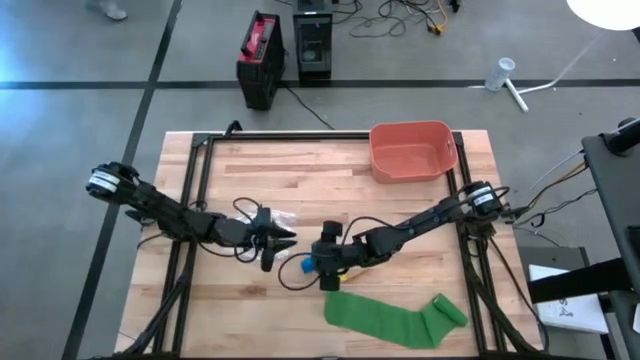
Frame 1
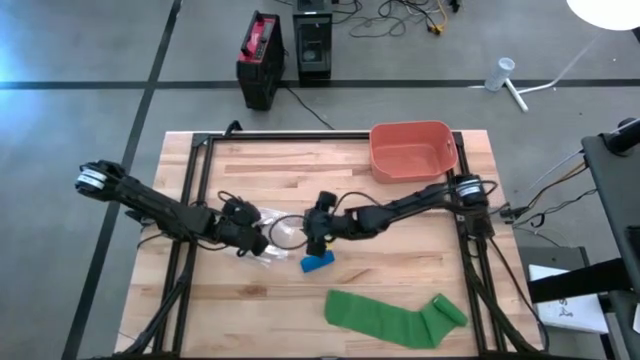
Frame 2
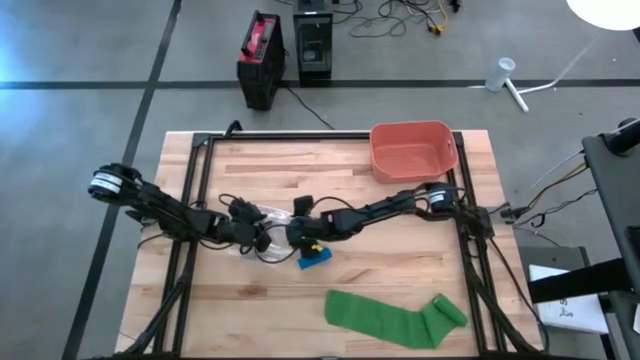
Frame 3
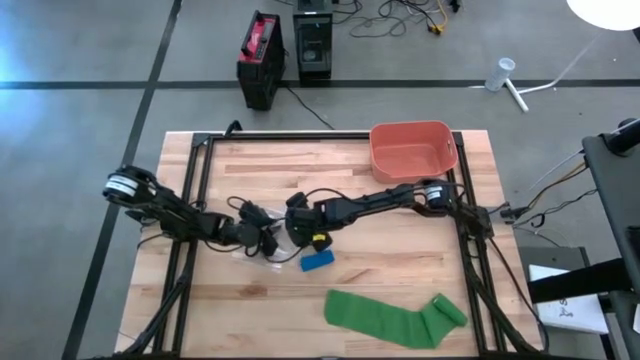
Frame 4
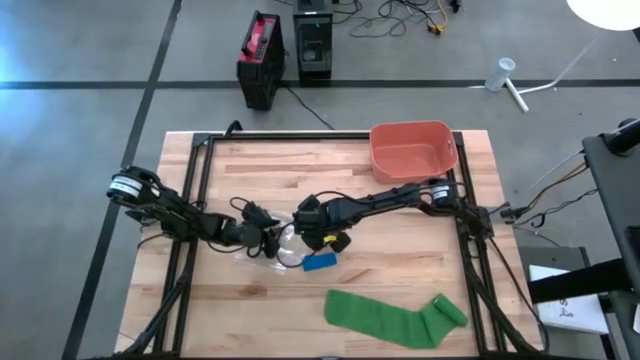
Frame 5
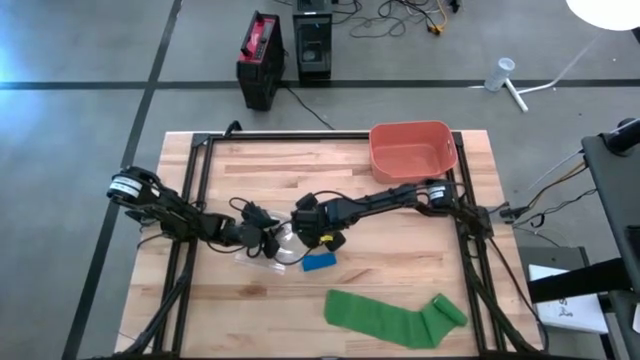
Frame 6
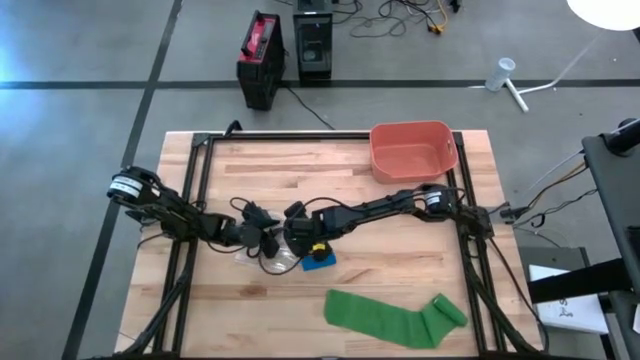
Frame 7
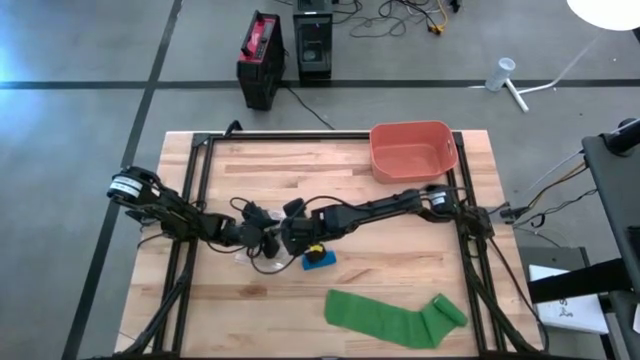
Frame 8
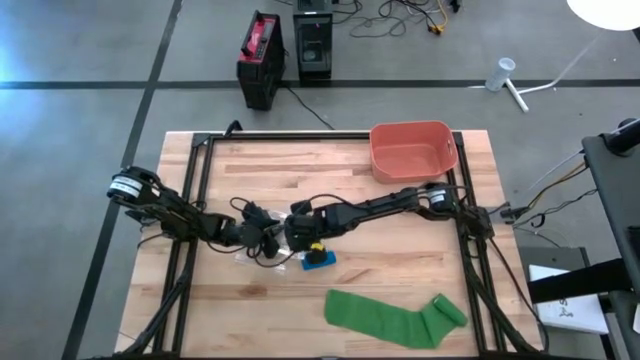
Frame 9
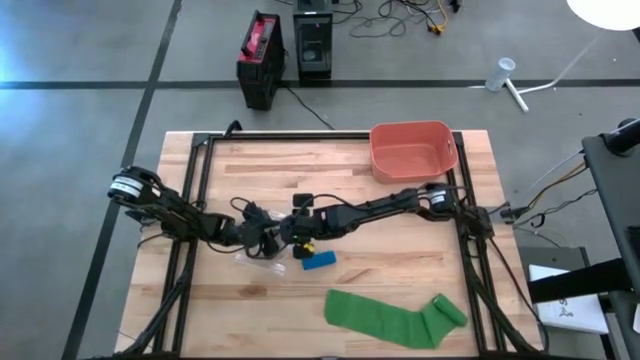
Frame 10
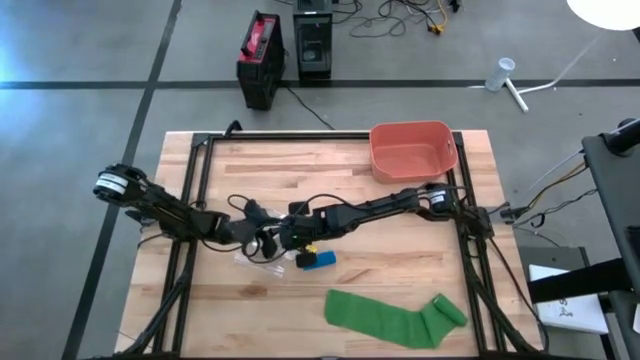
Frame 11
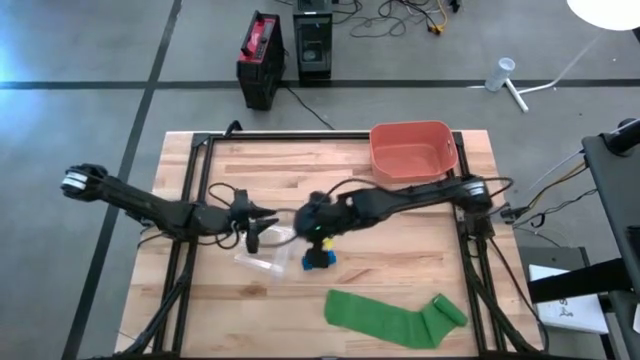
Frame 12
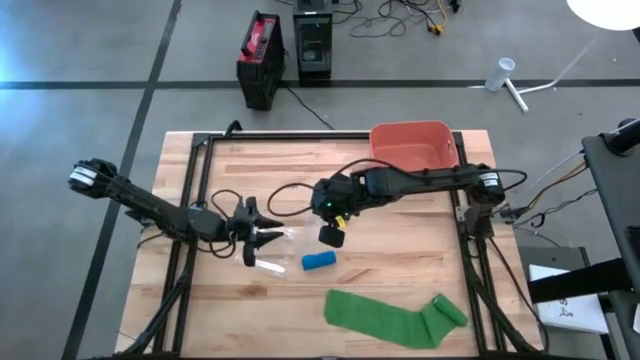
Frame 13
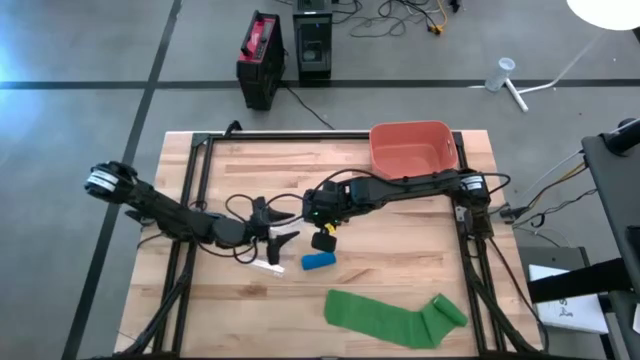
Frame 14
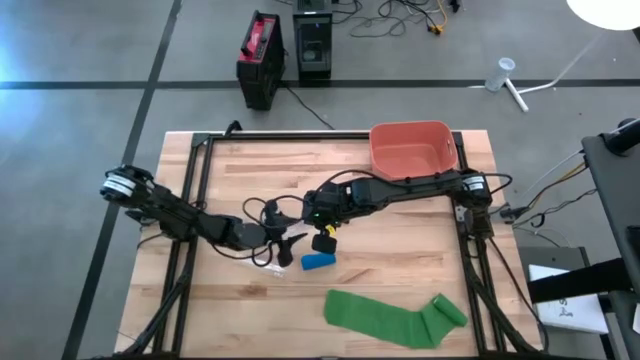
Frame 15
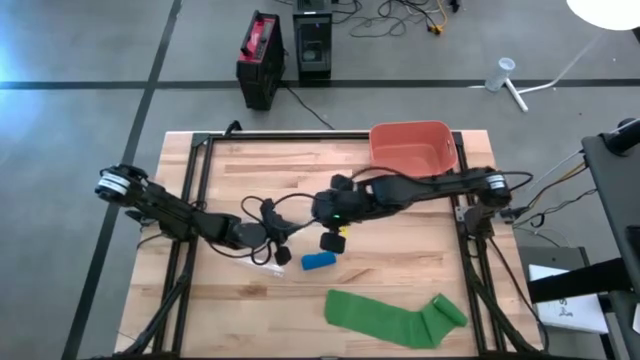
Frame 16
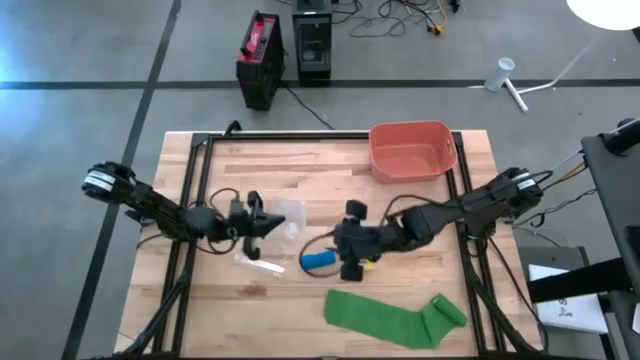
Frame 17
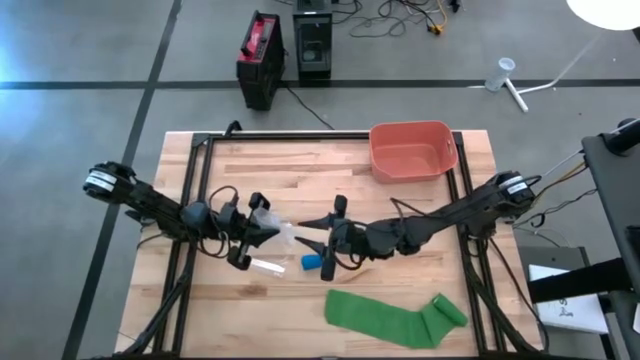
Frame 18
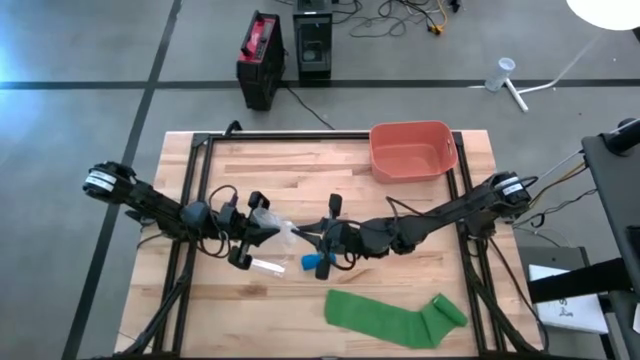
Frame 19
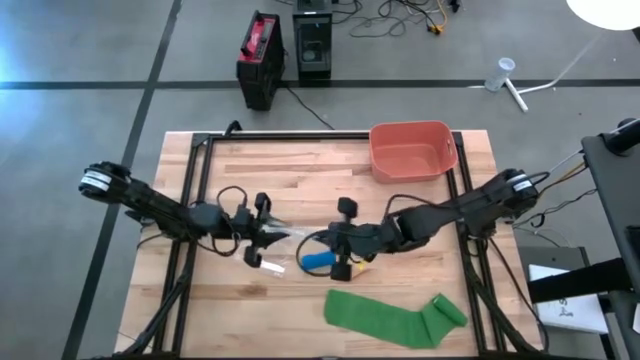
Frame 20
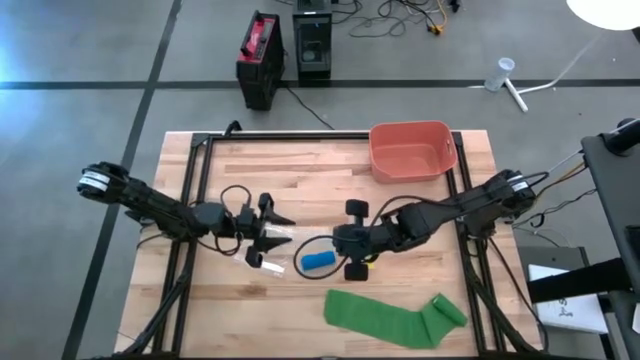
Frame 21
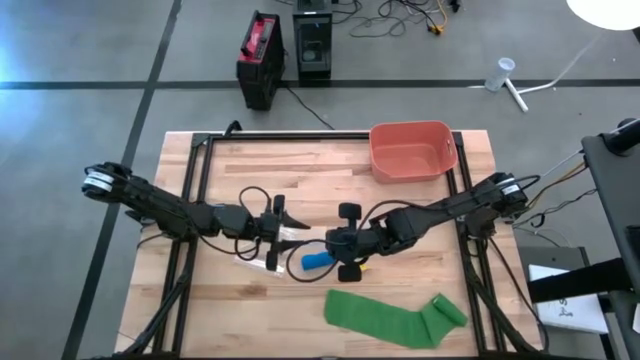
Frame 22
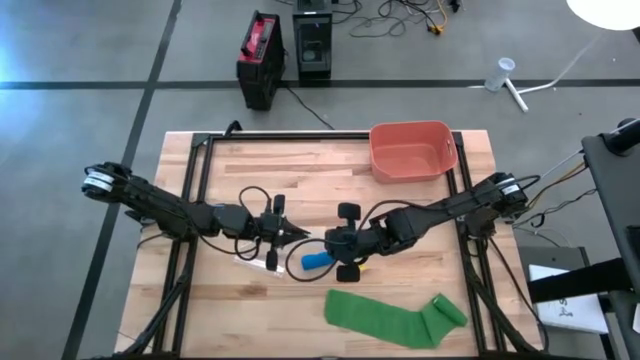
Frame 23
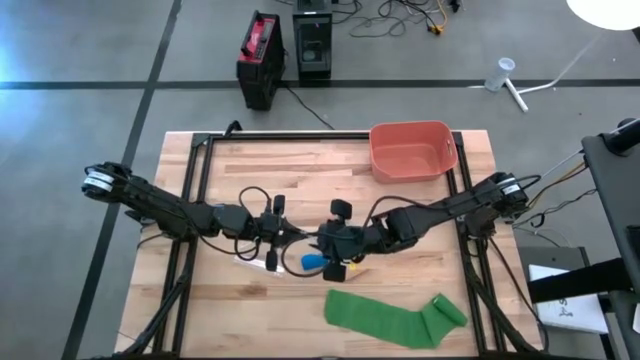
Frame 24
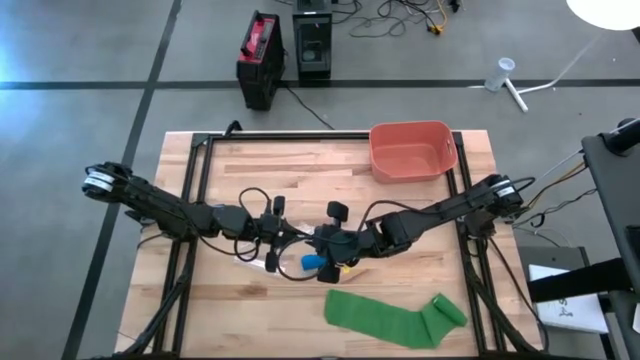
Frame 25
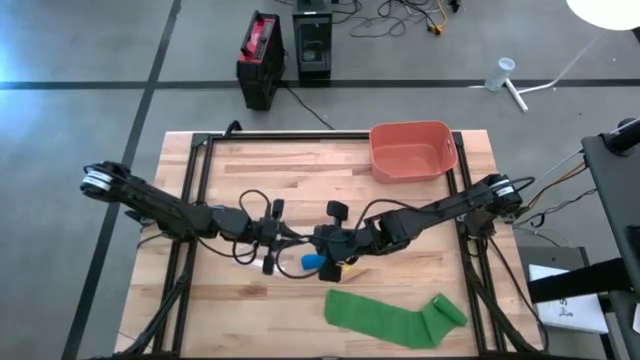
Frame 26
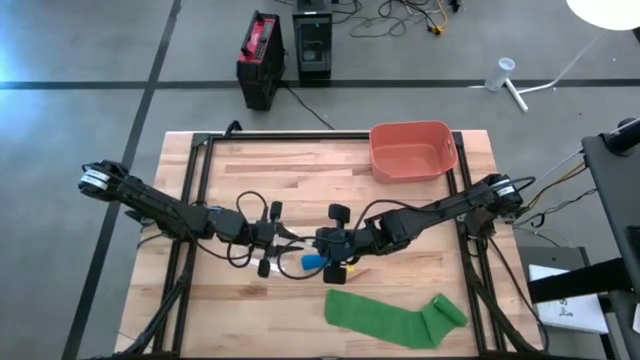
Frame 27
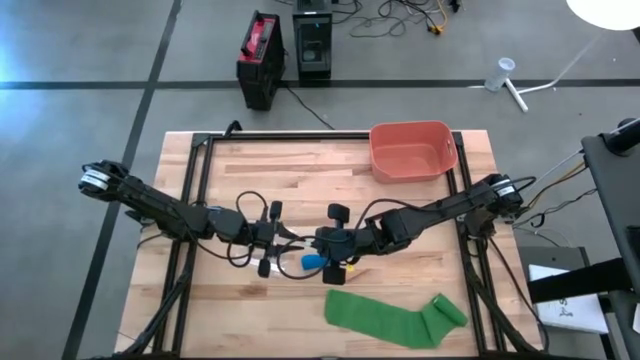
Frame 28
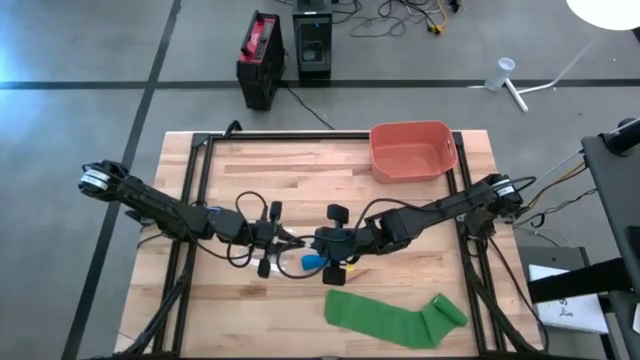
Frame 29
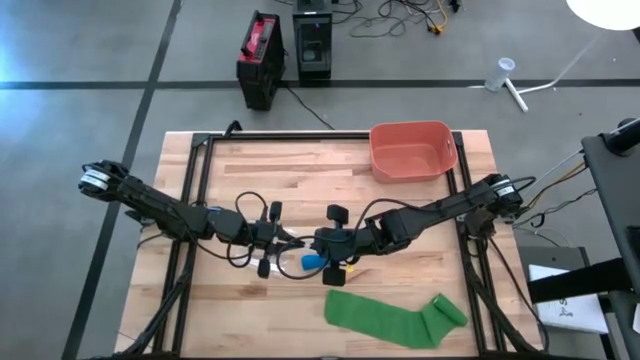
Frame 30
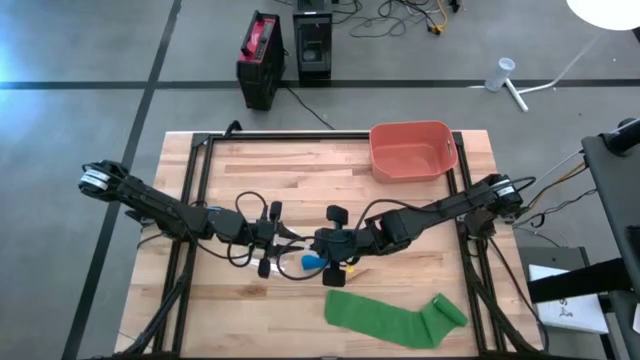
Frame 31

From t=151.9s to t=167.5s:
Task: Roll bandage
Open the transparent zip bag

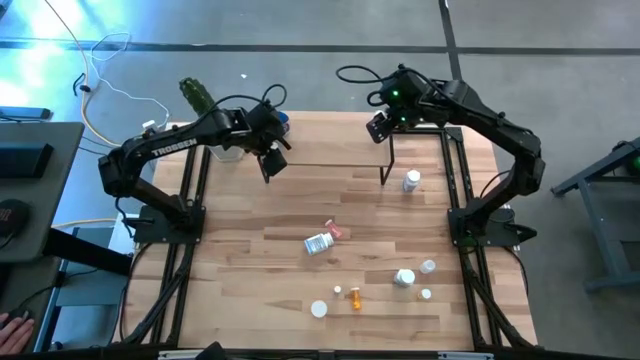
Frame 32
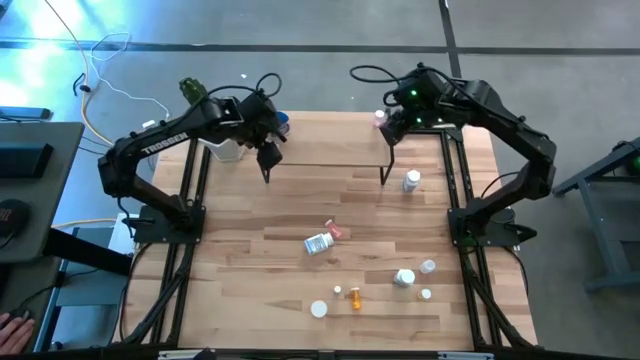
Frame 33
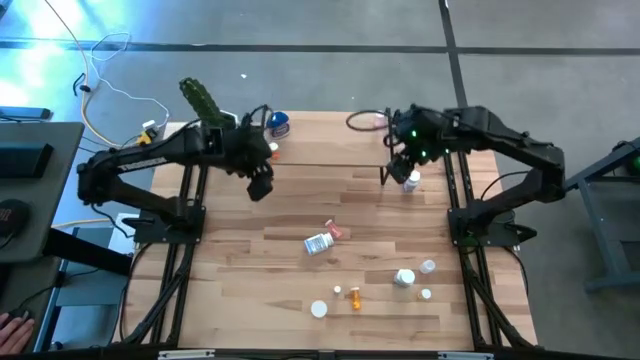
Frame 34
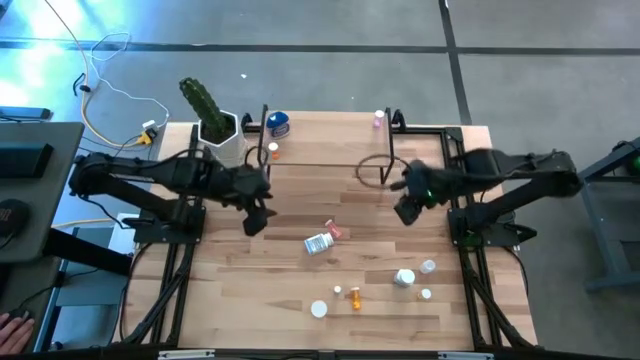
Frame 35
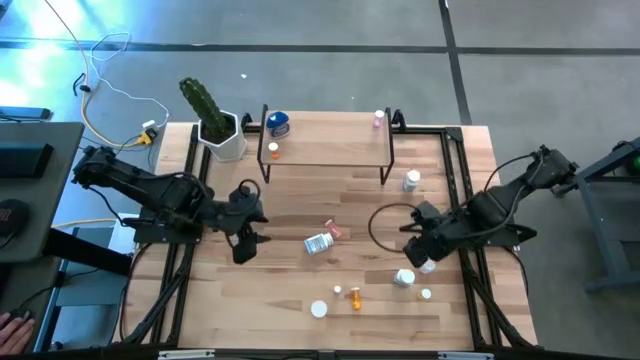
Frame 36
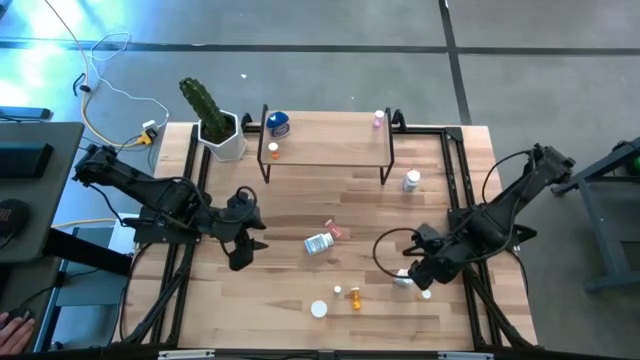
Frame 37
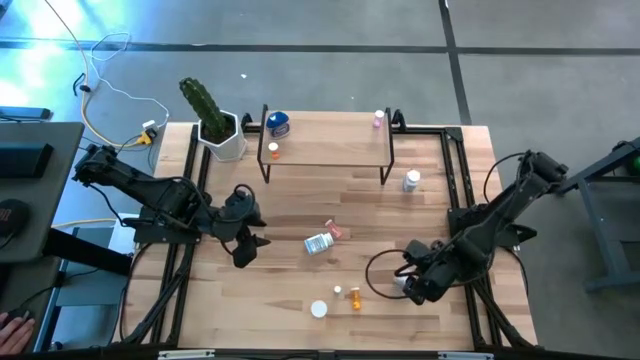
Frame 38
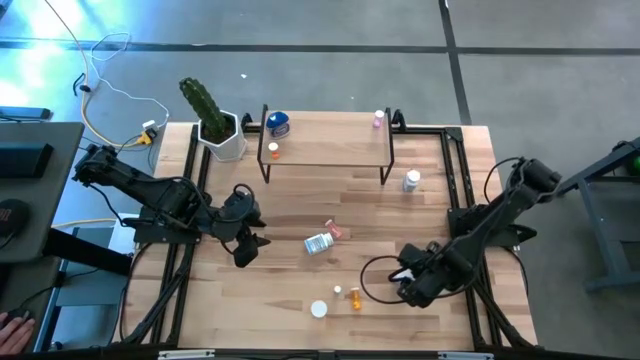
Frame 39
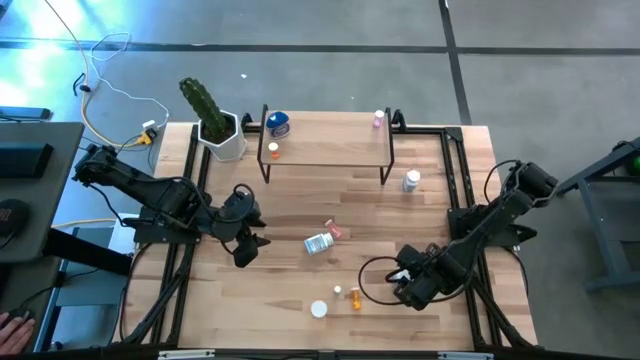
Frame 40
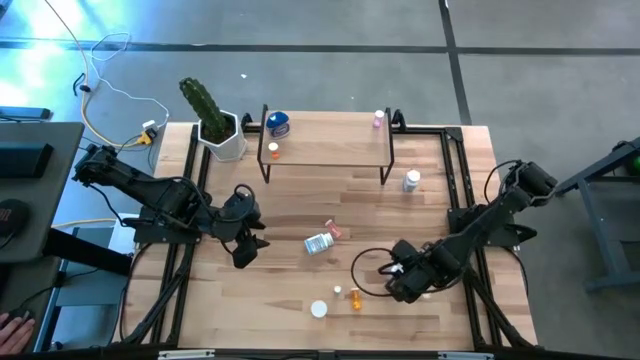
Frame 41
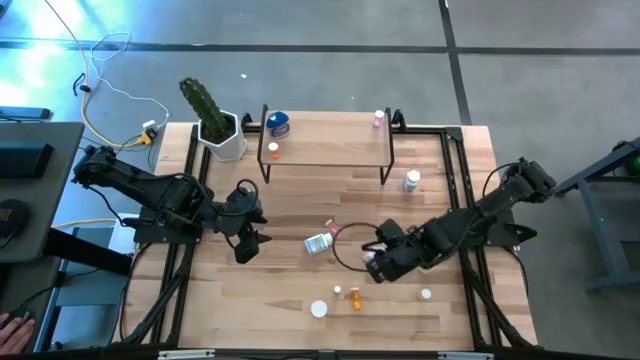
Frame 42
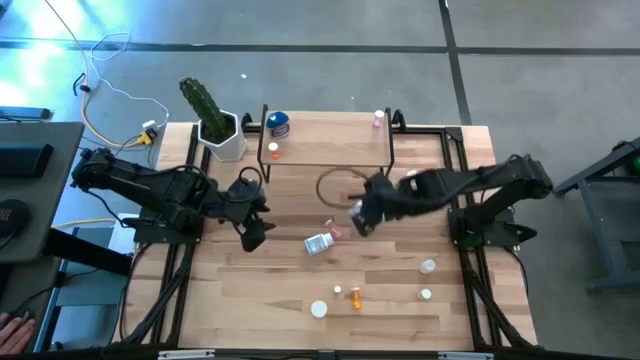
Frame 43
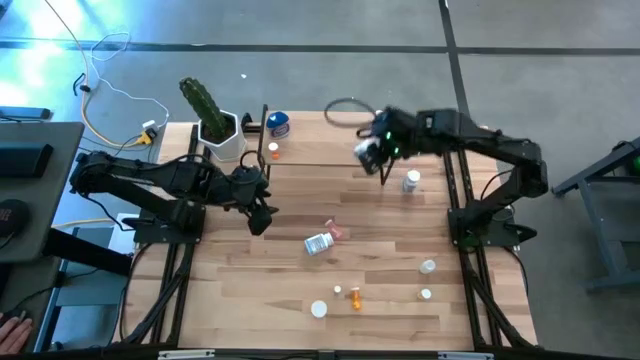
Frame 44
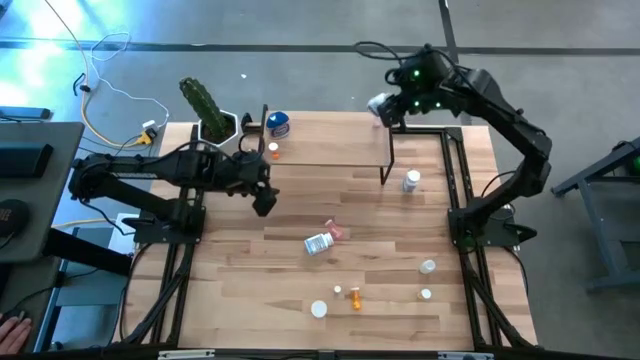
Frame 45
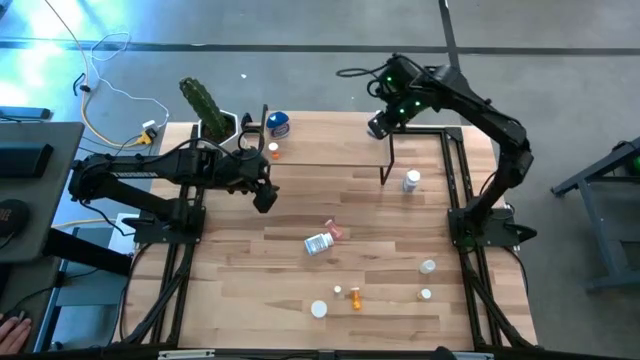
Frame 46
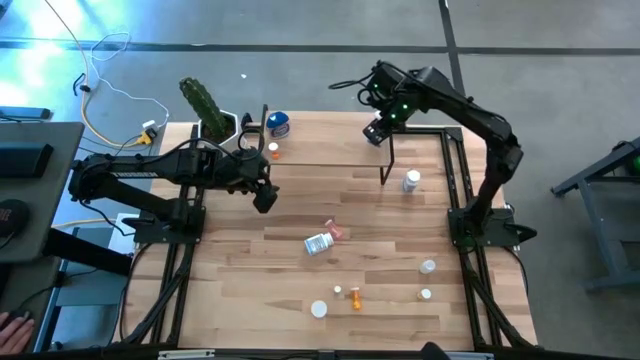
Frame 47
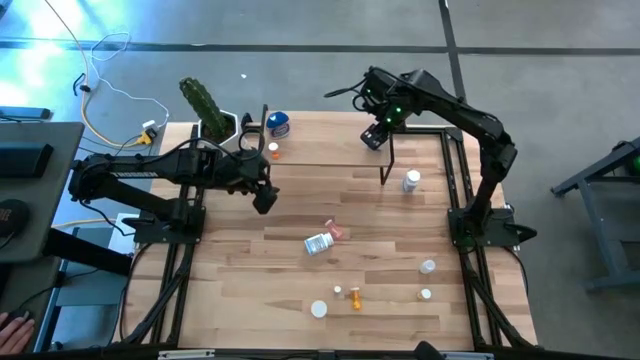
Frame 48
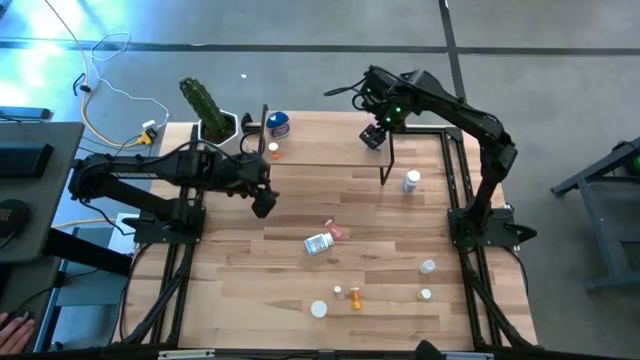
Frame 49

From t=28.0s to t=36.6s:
Task: Pick and place medicine bottles onto shelf by color
Put the bottom white pill bottle on the shelf
